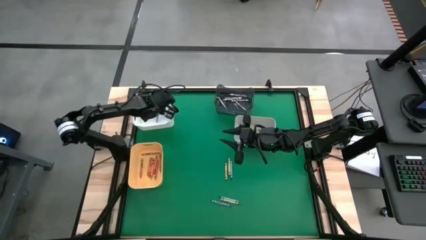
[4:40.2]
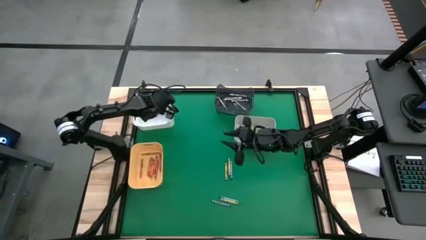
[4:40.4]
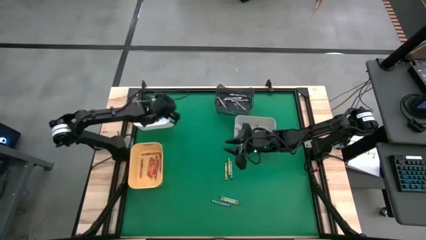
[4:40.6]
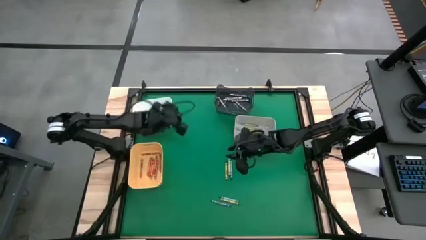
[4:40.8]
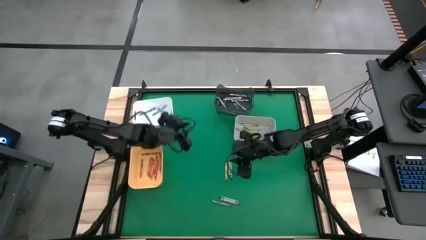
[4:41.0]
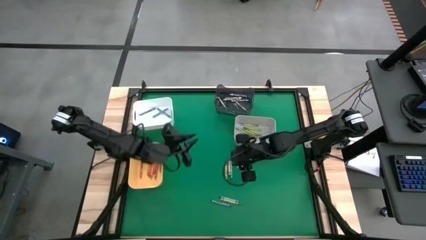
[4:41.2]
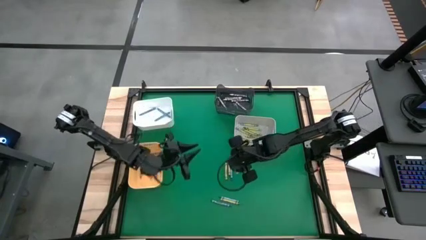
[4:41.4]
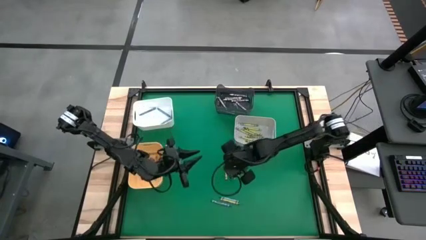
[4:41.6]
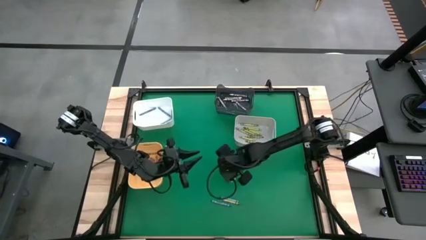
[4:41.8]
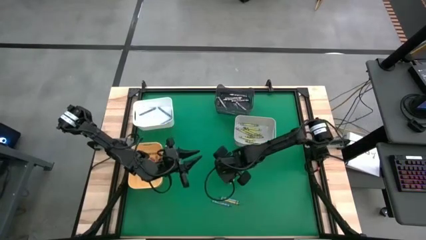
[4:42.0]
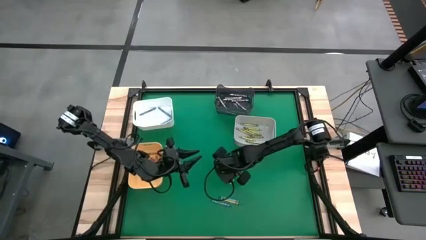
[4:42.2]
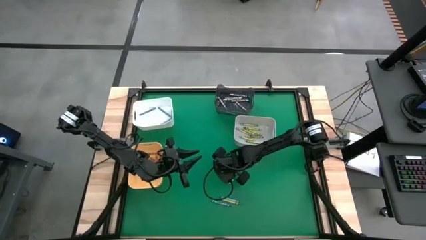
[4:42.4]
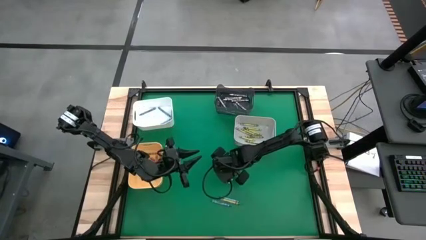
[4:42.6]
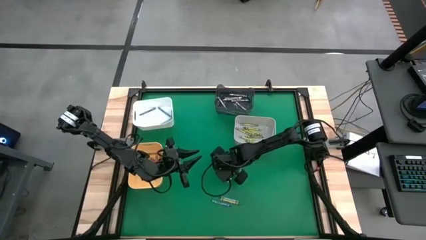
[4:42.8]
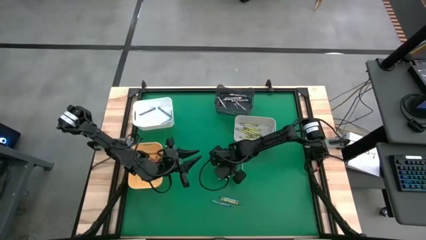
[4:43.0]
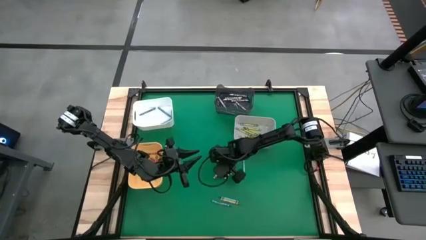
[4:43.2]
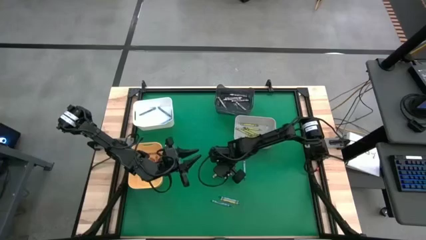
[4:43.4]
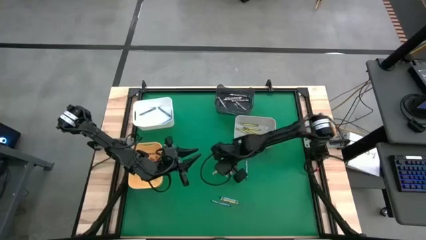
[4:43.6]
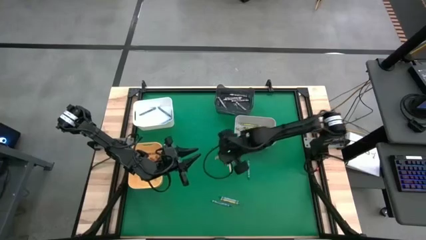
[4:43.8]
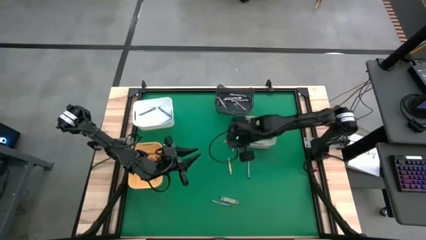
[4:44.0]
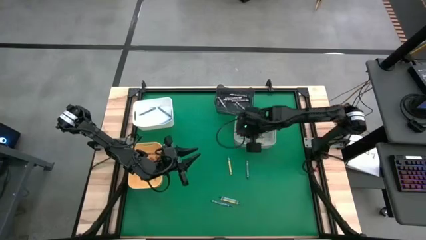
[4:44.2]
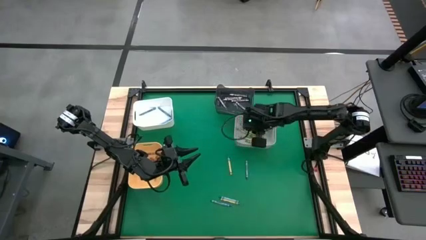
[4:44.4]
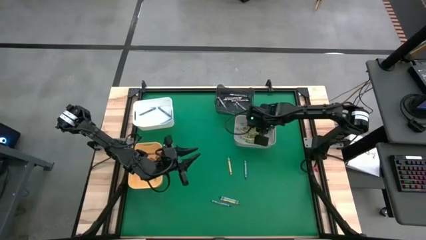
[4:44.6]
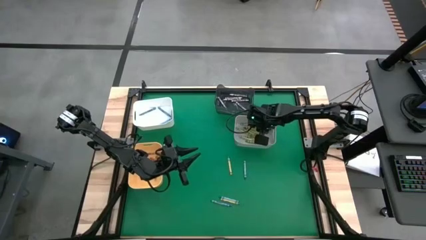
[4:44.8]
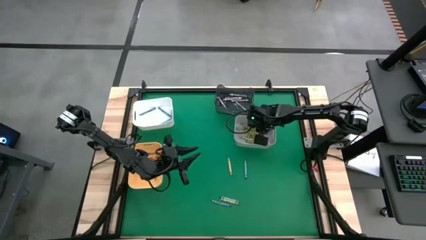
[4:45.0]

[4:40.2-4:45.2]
Task: Sort crayons
Put the green crayon into the gray bin

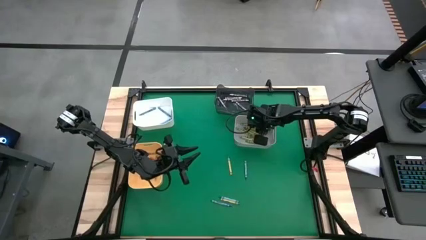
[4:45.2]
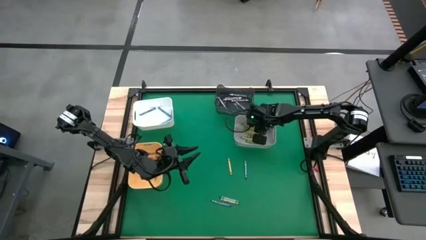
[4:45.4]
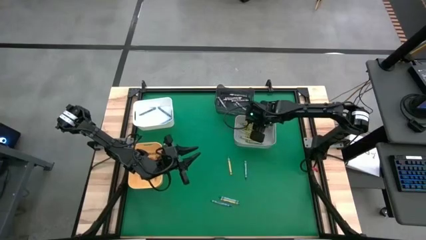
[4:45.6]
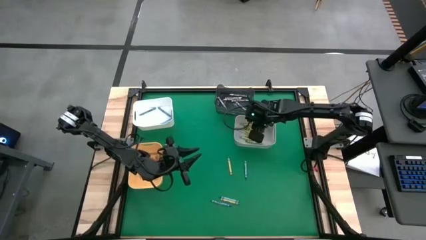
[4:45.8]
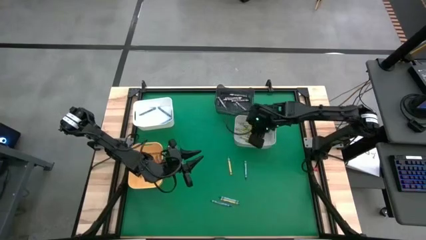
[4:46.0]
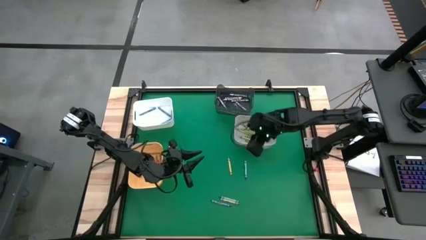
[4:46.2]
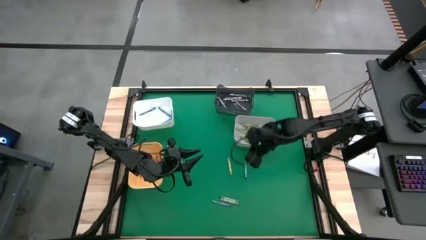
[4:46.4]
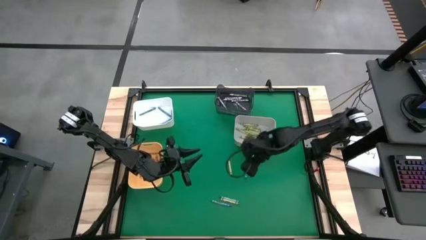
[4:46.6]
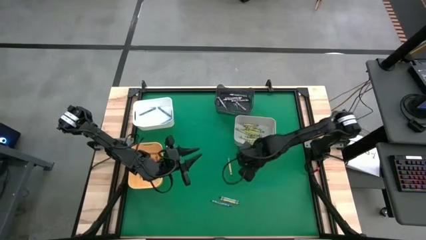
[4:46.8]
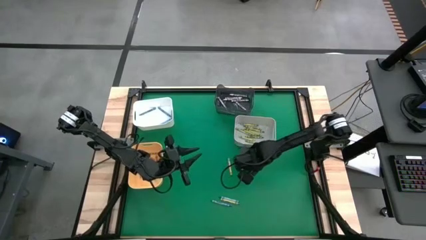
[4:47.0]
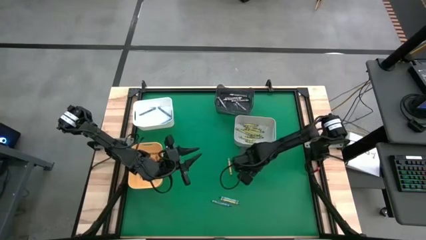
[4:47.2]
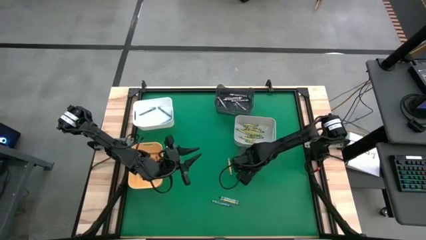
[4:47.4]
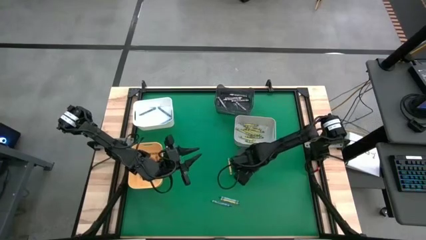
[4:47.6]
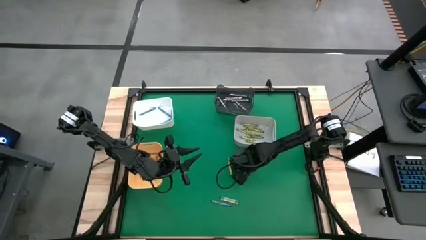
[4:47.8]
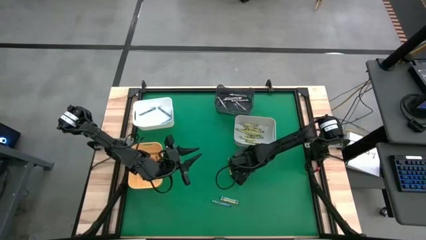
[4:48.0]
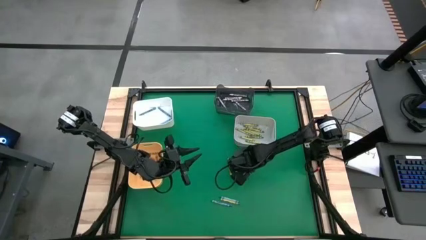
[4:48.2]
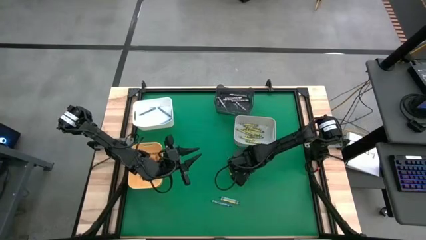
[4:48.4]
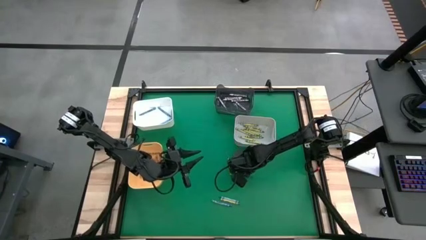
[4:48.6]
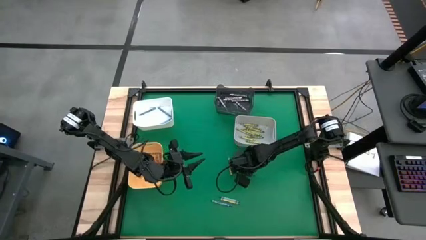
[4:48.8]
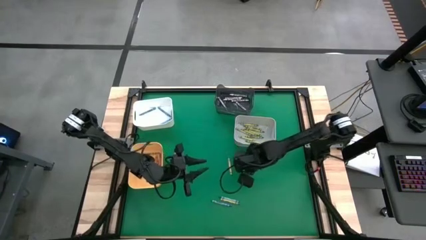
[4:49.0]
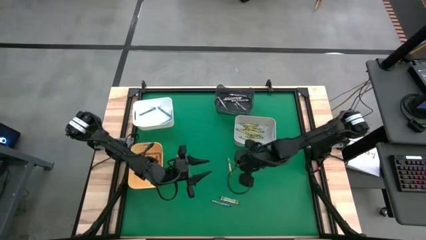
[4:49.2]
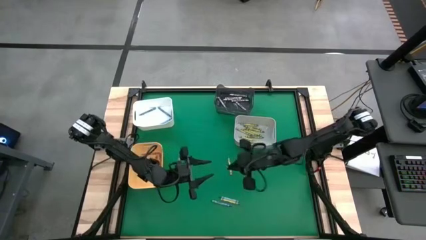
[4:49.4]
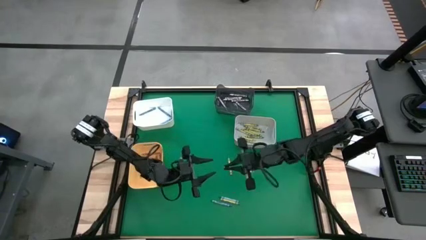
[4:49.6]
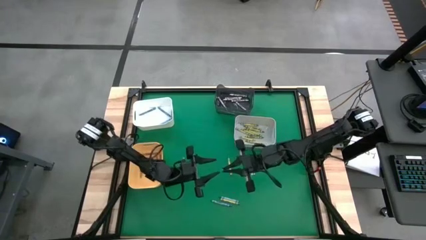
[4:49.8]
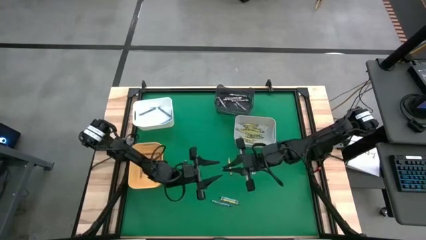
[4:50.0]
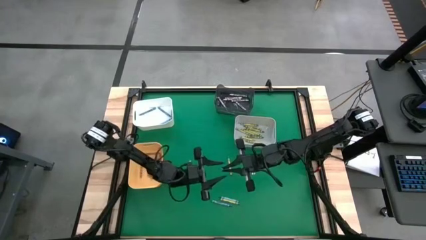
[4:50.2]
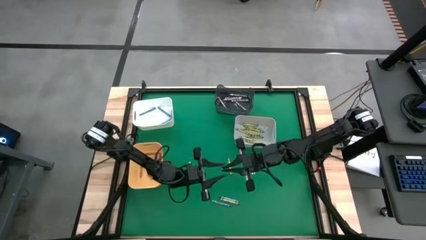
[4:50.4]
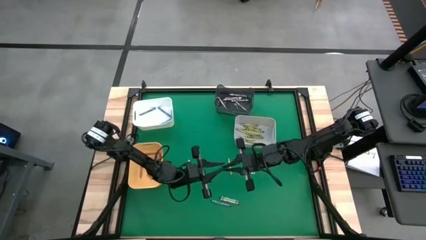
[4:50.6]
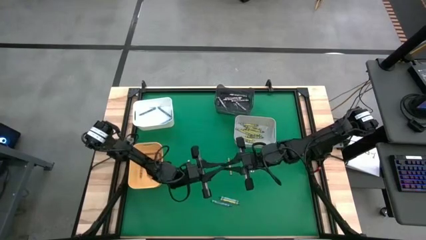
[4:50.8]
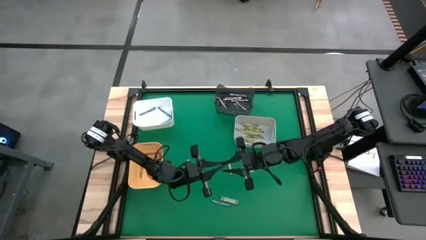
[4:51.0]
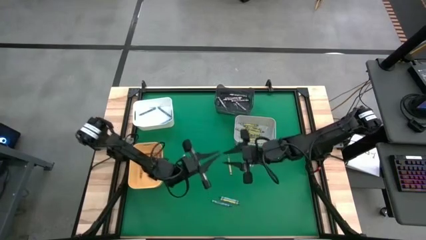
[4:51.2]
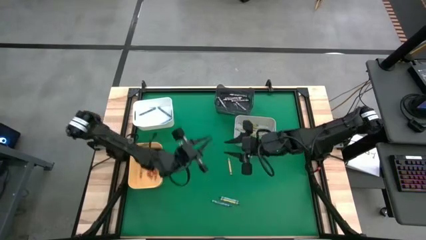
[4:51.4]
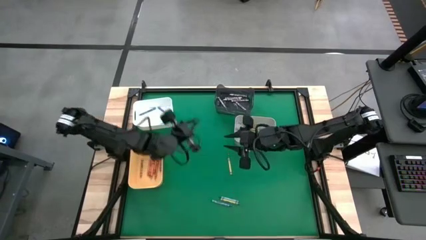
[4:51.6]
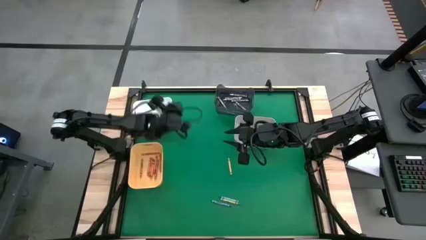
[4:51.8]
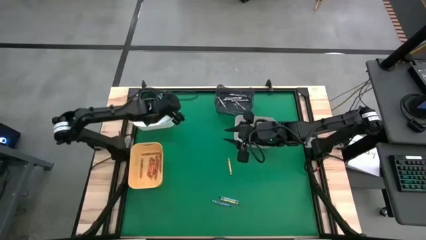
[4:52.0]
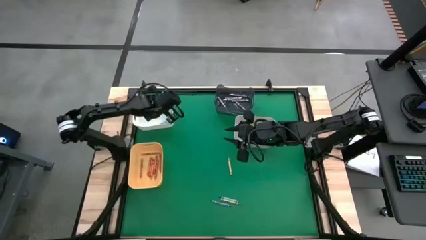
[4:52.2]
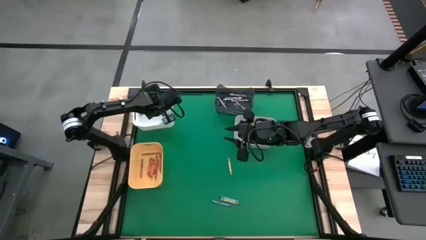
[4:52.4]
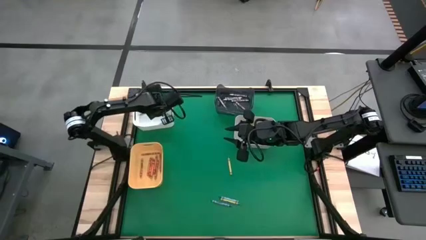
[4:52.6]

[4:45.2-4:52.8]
Put the blue crayon into the white bin
